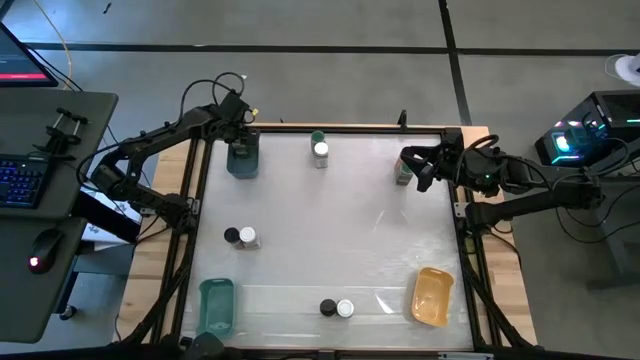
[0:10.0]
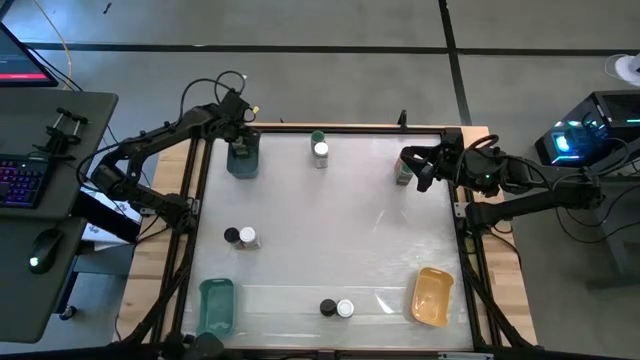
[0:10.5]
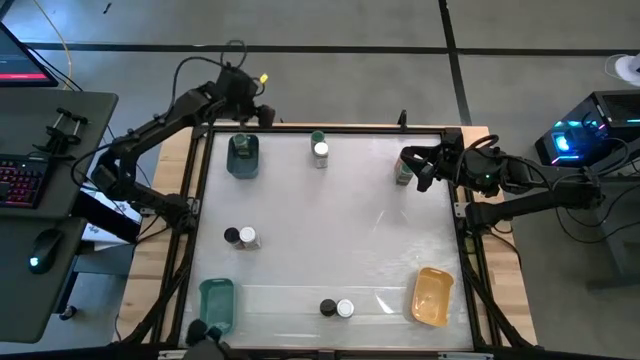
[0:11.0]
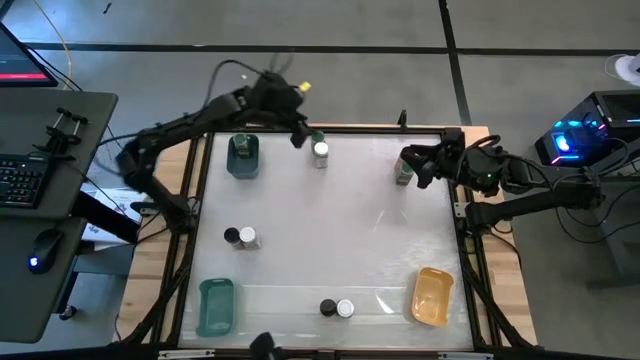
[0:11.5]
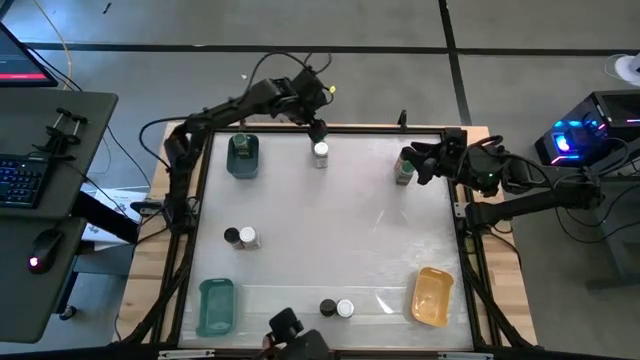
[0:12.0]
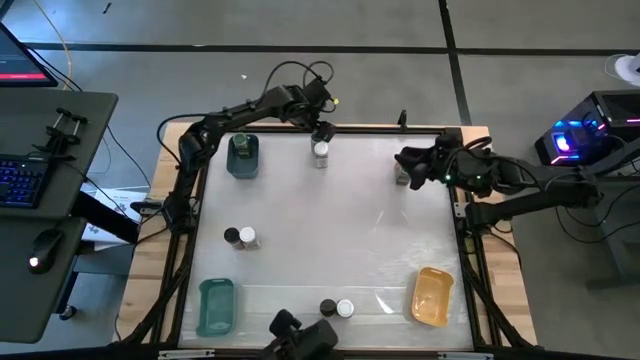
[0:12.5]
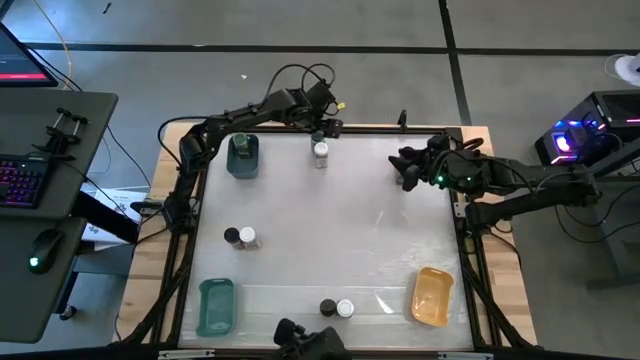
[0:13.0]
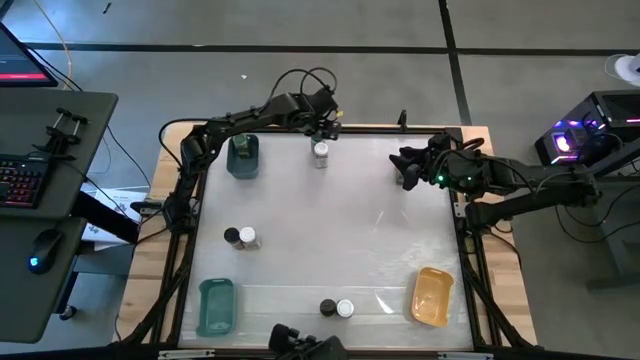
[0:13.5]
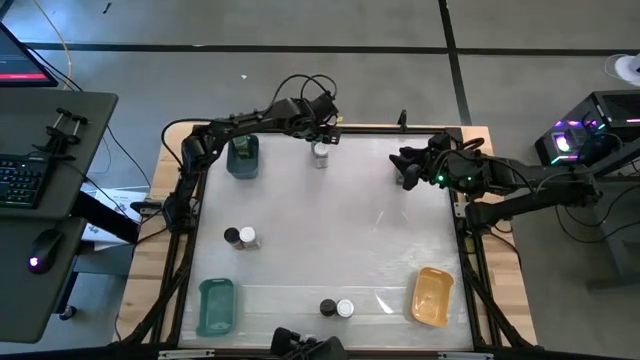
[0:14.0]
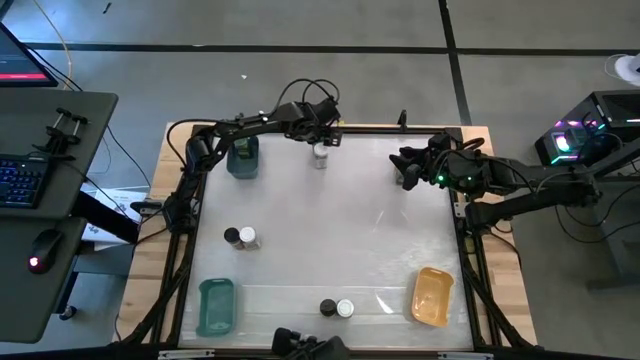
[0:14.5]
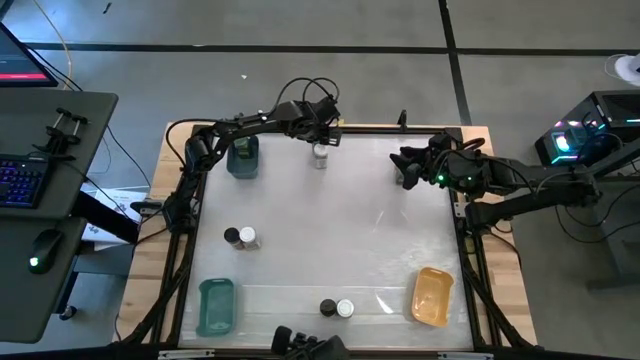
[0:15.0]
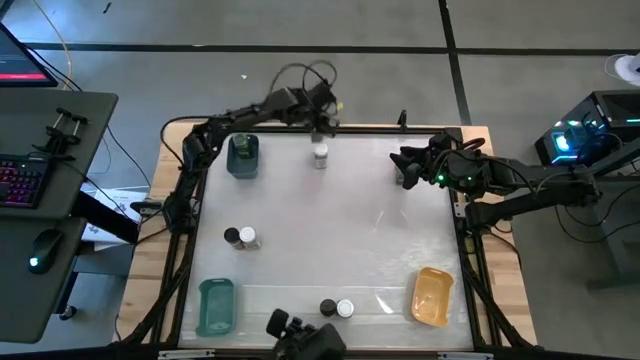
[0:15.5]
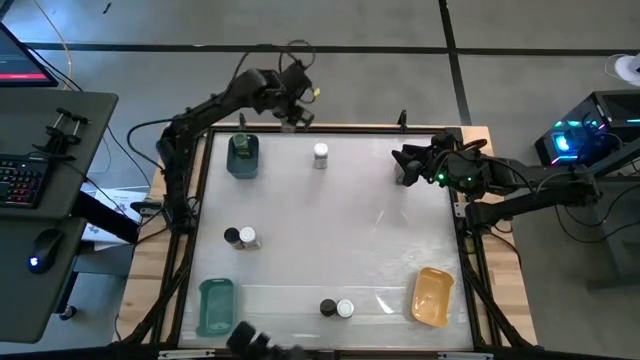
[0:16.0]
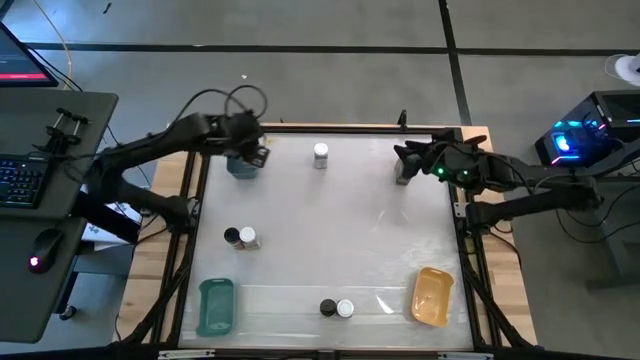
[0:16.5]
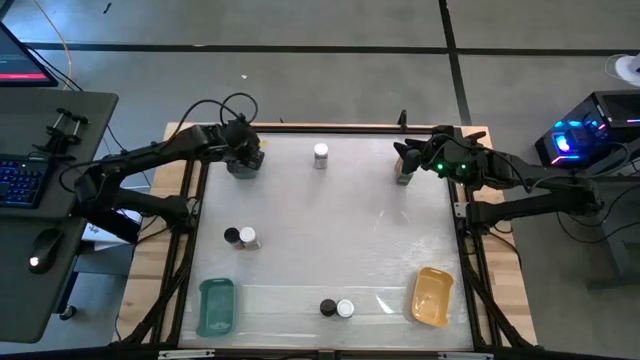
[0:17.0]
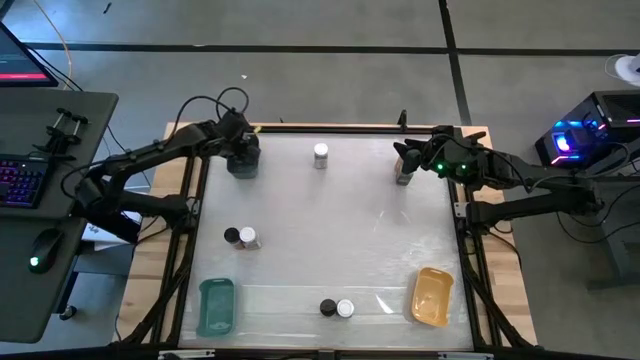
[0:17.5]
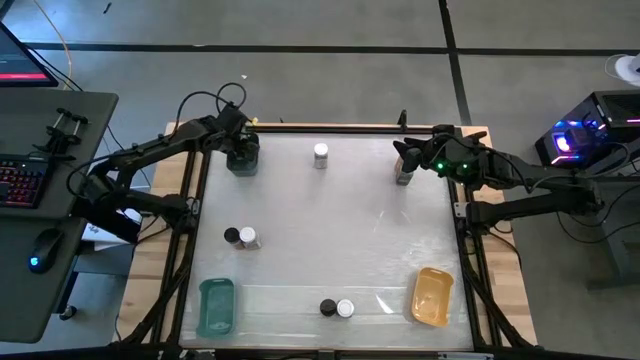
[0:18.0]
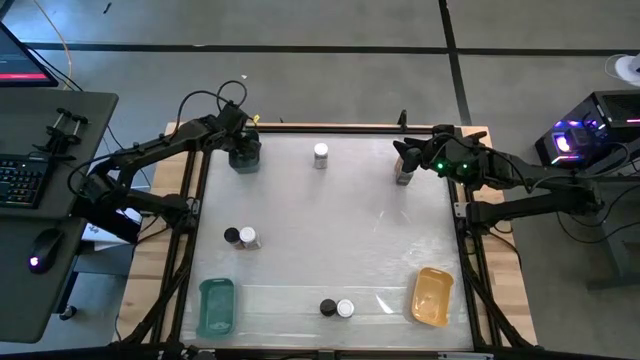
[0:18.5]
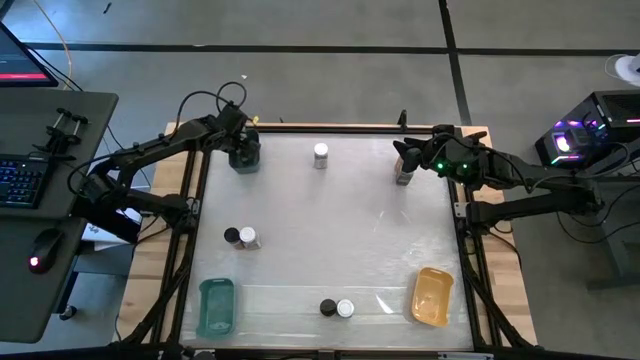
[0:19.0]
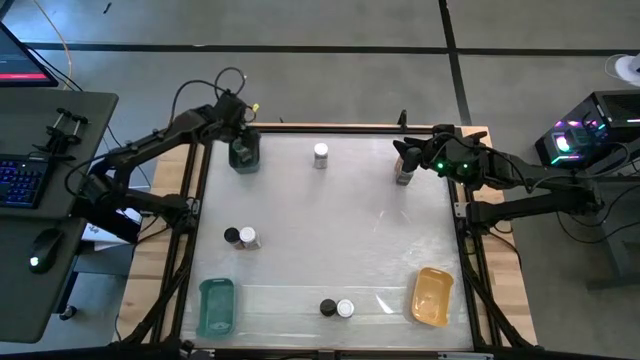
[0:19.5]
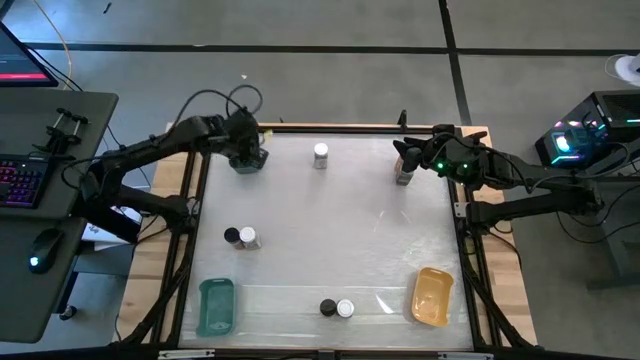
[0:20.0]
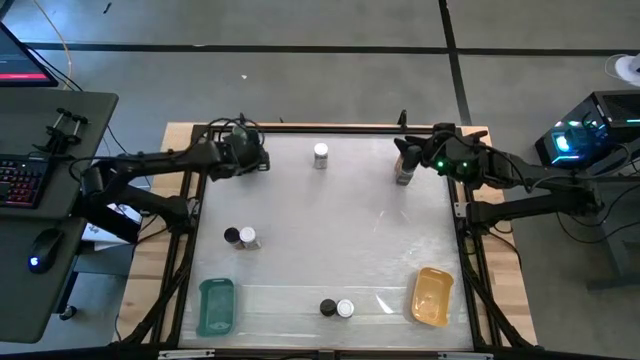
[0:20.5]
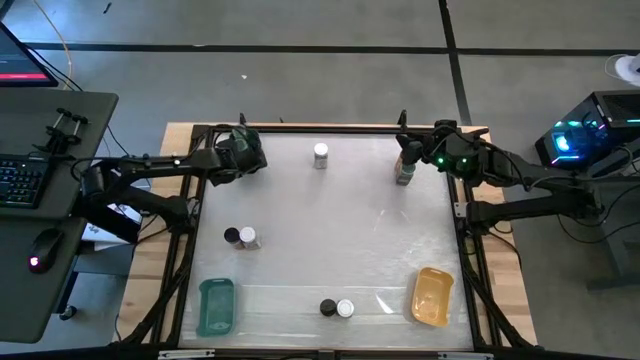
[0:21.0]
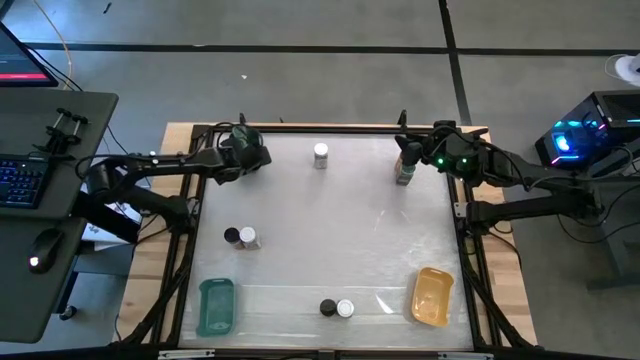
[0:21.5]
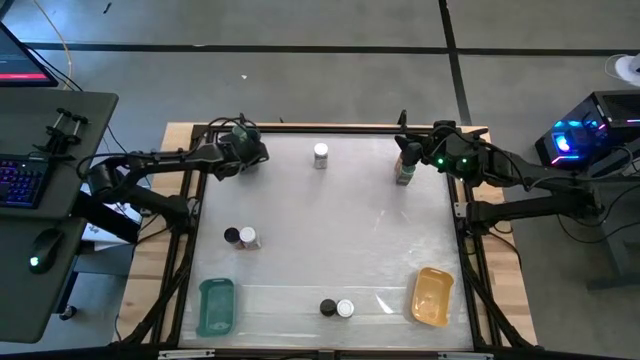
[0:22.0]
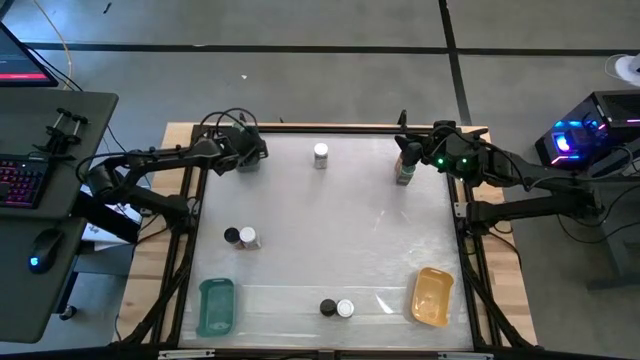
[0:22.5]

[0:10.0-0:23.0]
Task: Sort spices by type
Put the left green seasoning bottle into the blue bin
